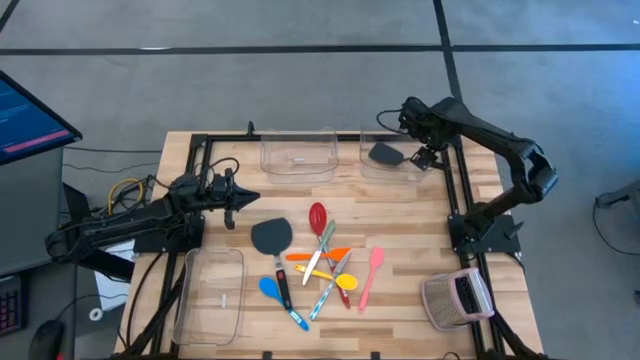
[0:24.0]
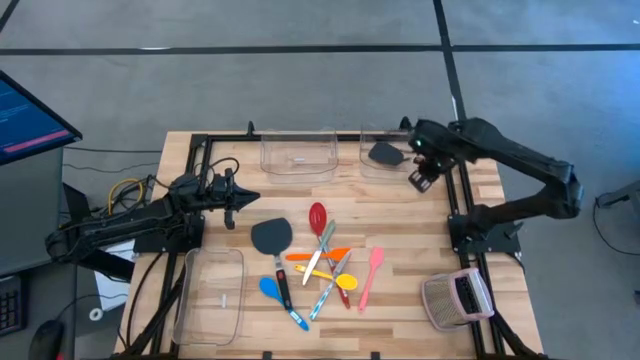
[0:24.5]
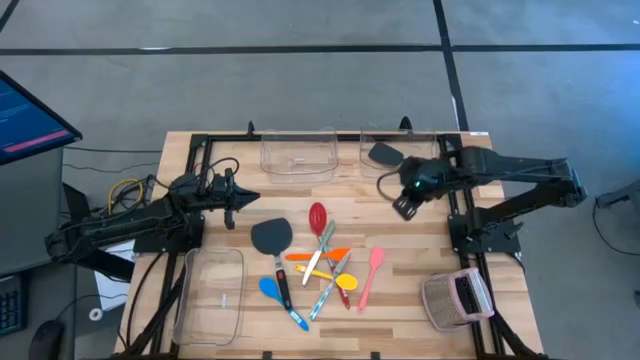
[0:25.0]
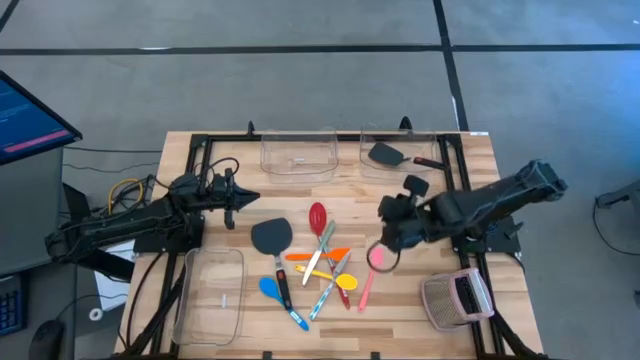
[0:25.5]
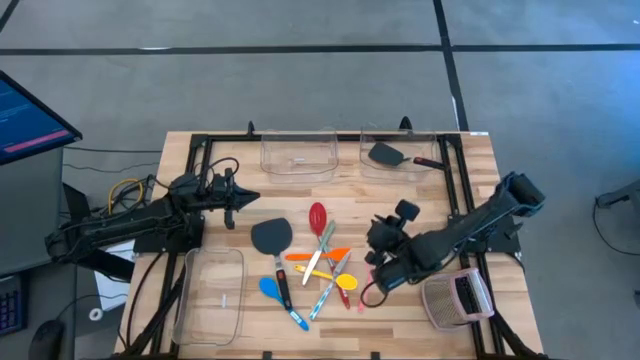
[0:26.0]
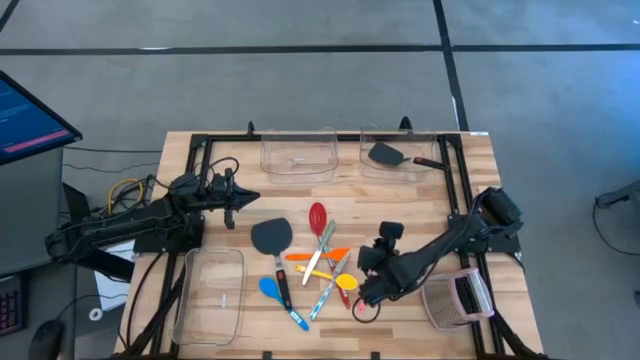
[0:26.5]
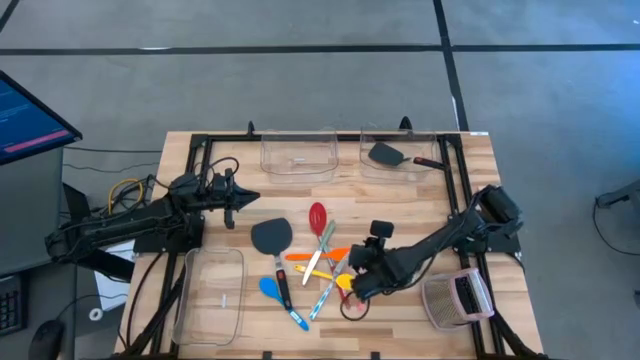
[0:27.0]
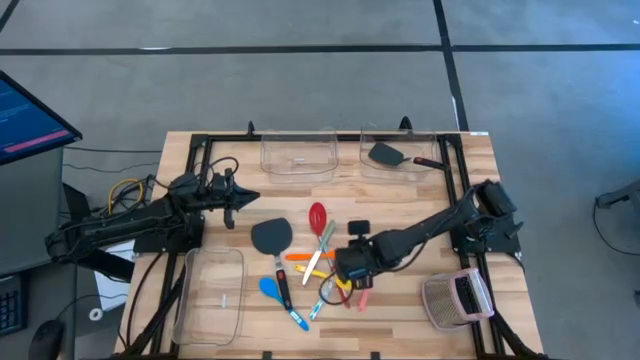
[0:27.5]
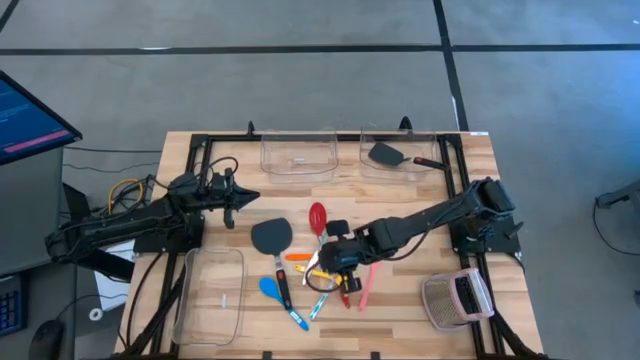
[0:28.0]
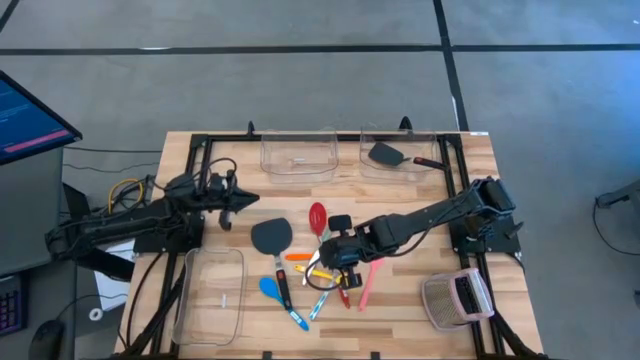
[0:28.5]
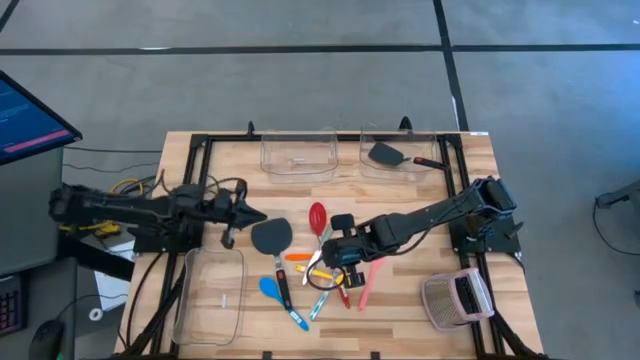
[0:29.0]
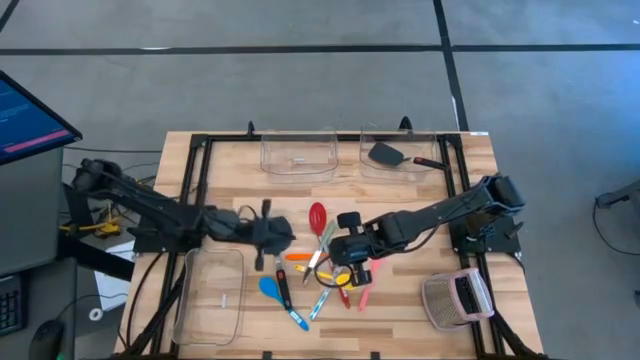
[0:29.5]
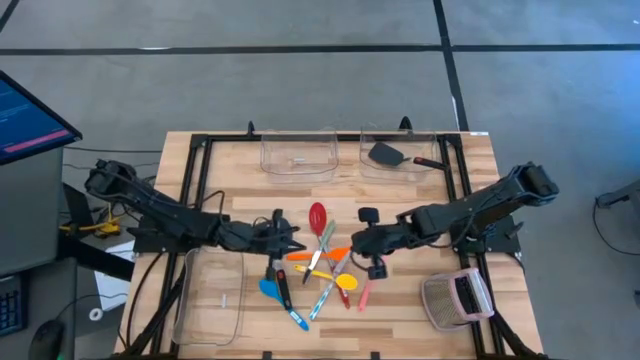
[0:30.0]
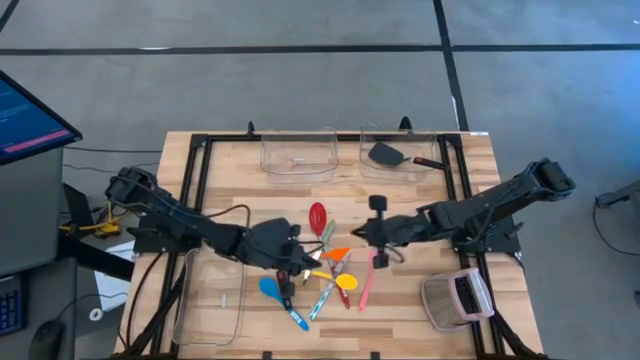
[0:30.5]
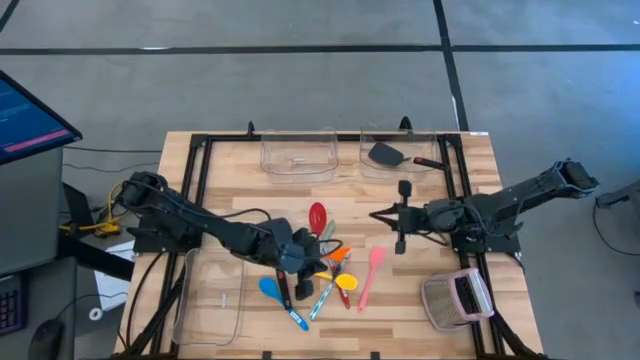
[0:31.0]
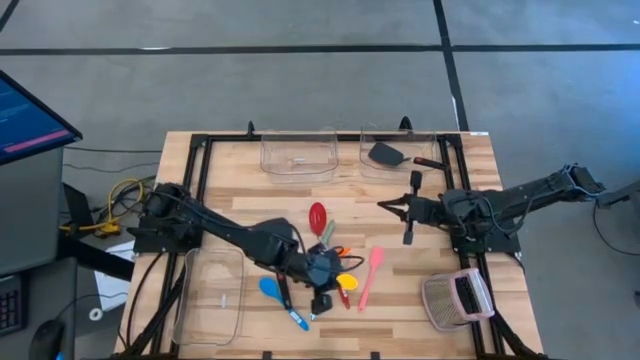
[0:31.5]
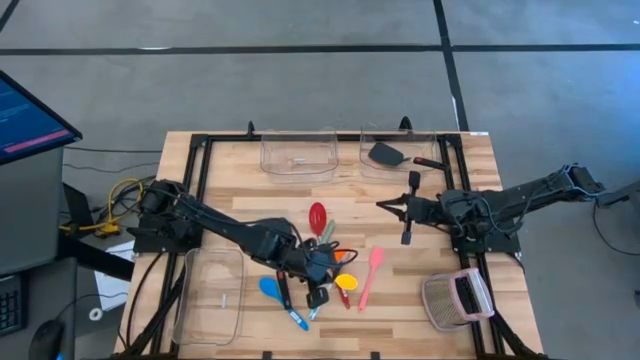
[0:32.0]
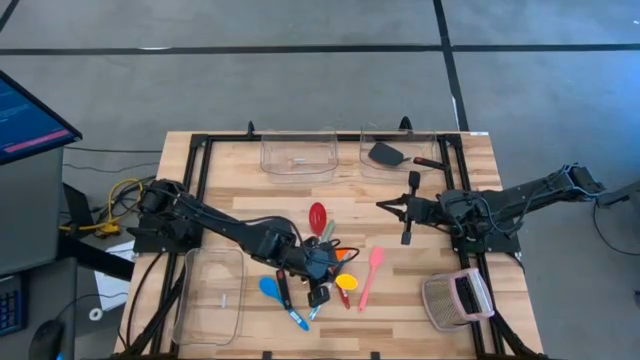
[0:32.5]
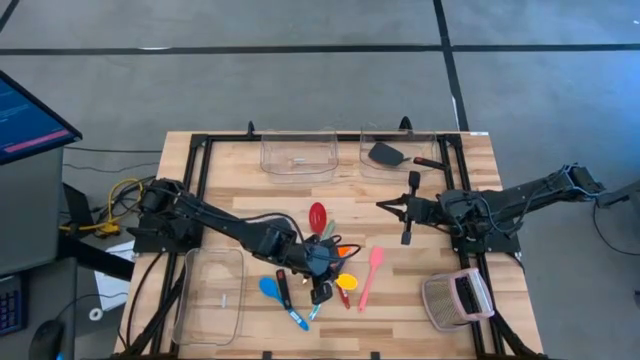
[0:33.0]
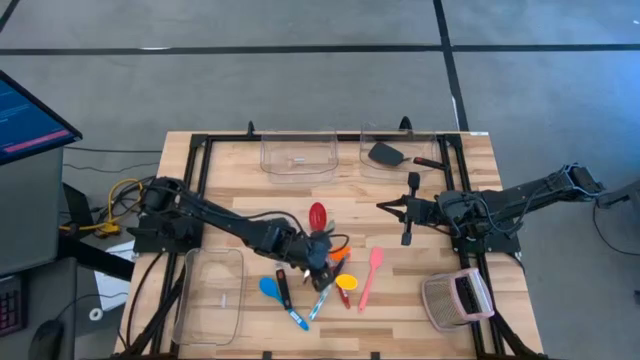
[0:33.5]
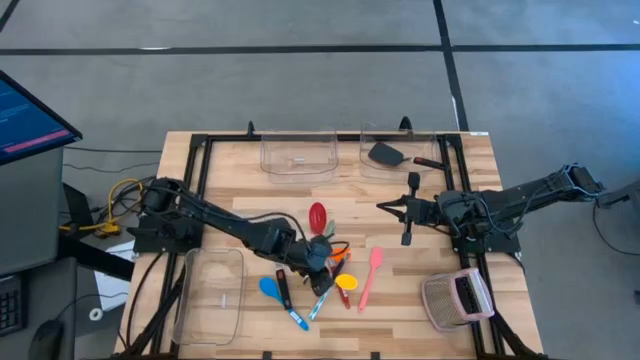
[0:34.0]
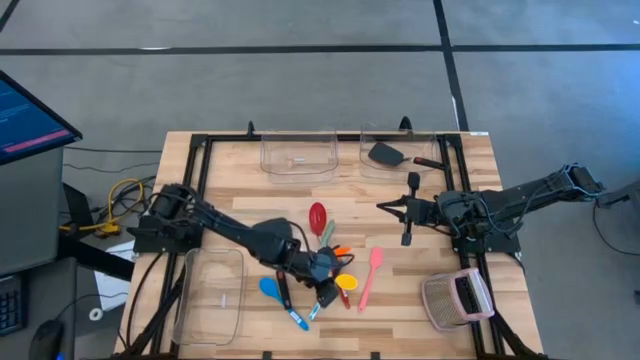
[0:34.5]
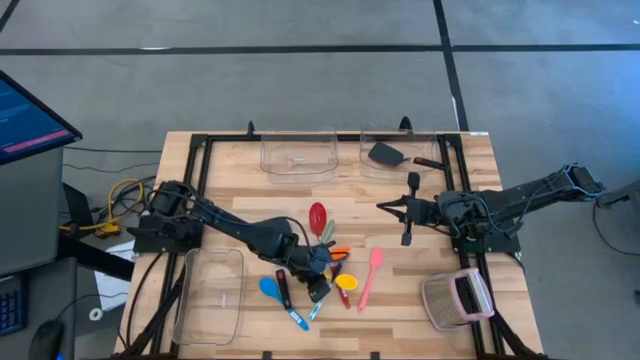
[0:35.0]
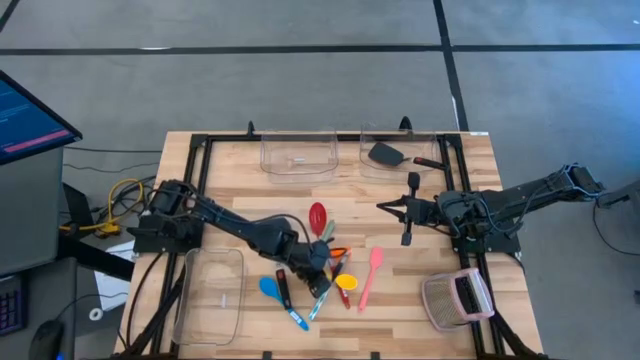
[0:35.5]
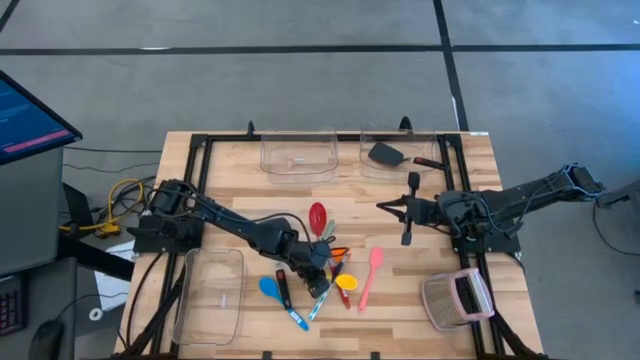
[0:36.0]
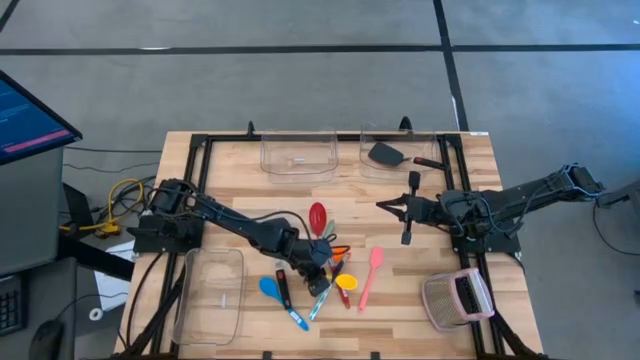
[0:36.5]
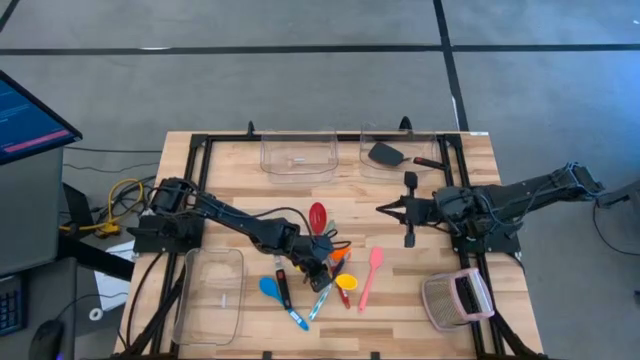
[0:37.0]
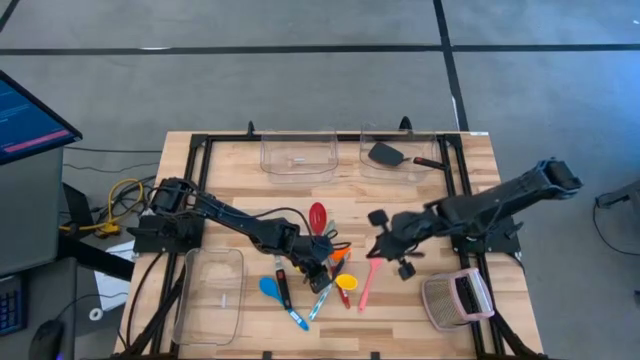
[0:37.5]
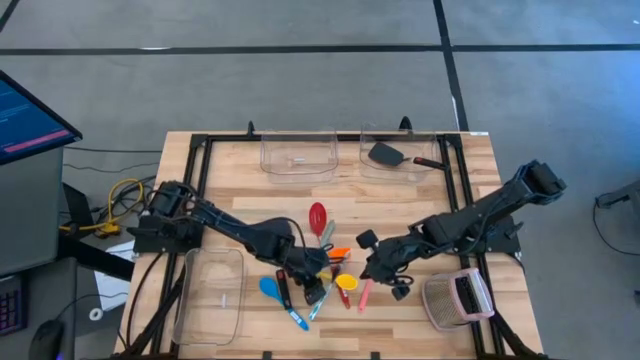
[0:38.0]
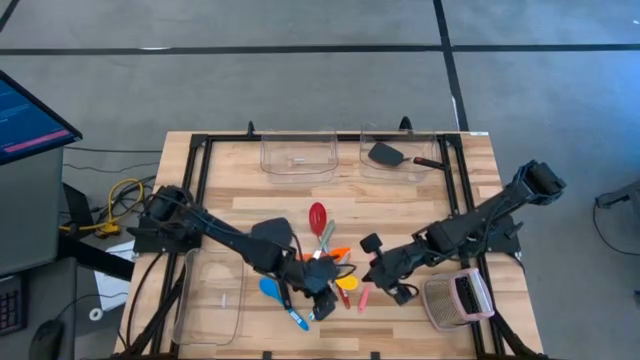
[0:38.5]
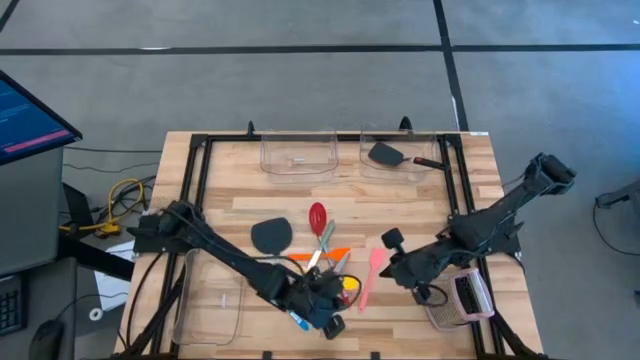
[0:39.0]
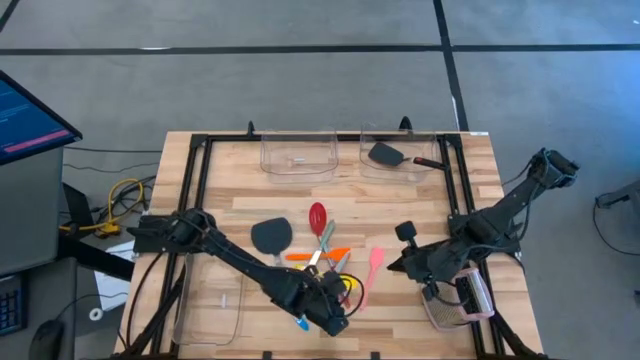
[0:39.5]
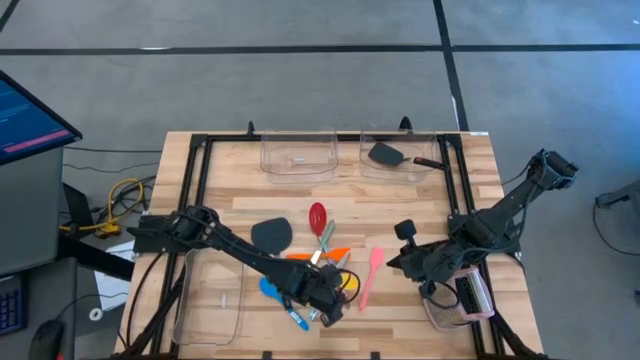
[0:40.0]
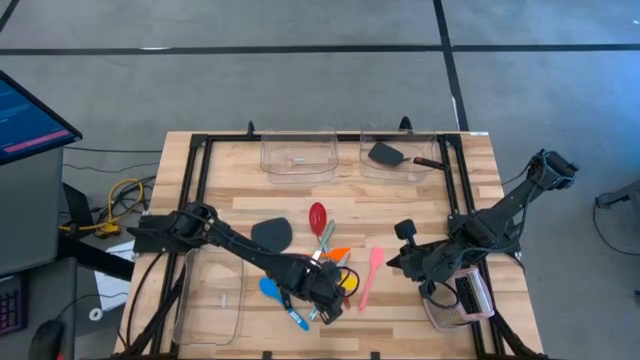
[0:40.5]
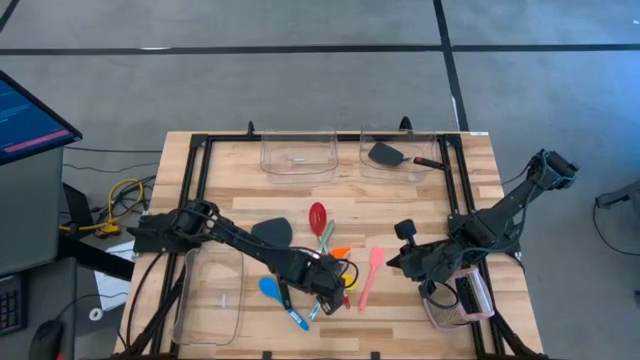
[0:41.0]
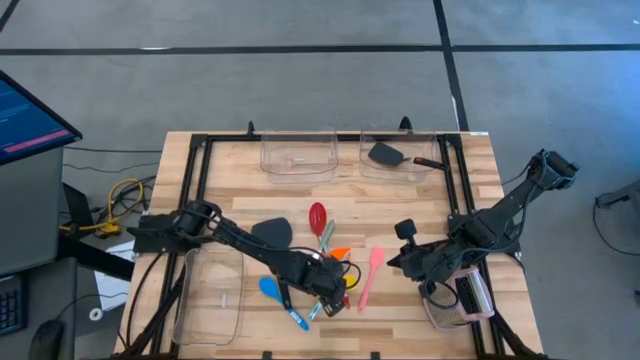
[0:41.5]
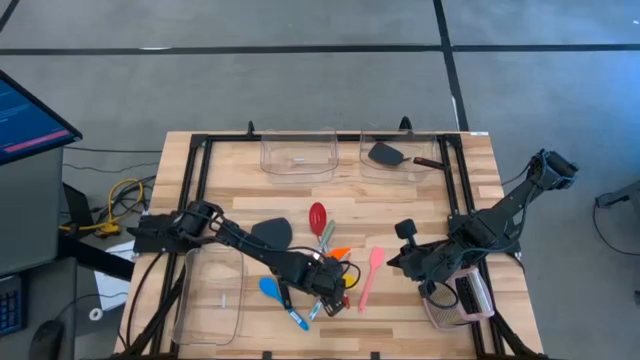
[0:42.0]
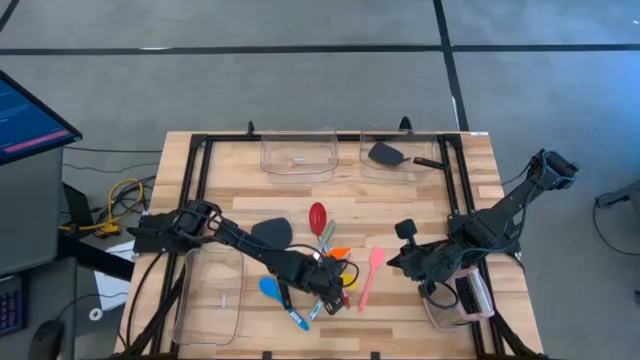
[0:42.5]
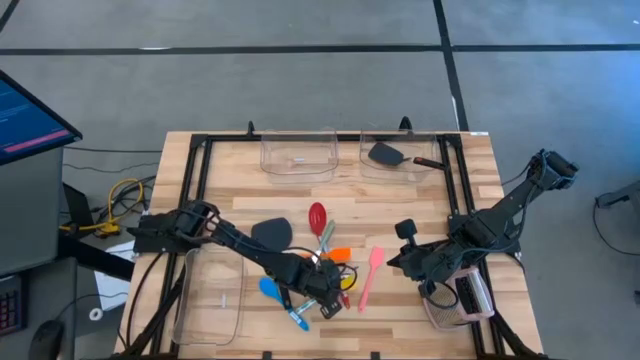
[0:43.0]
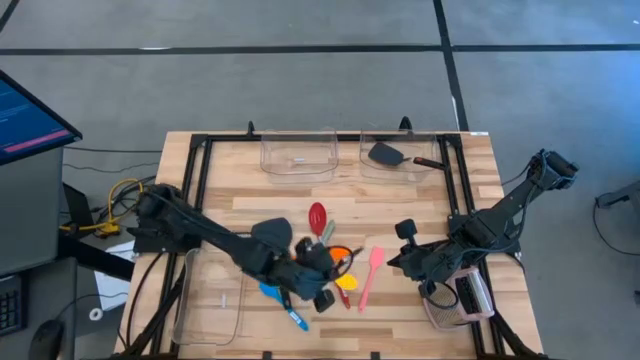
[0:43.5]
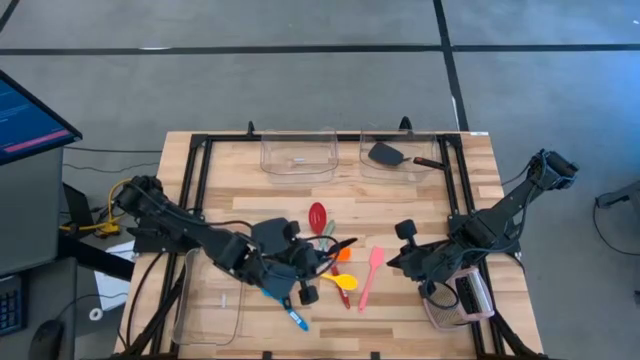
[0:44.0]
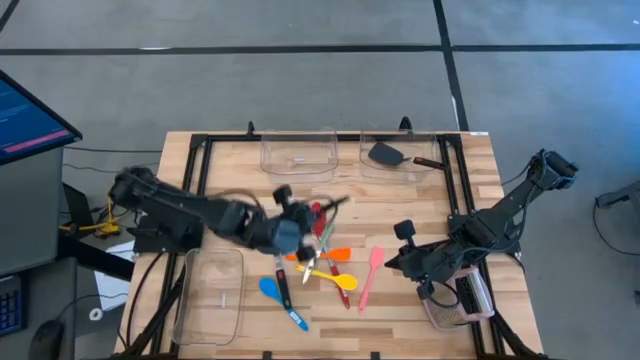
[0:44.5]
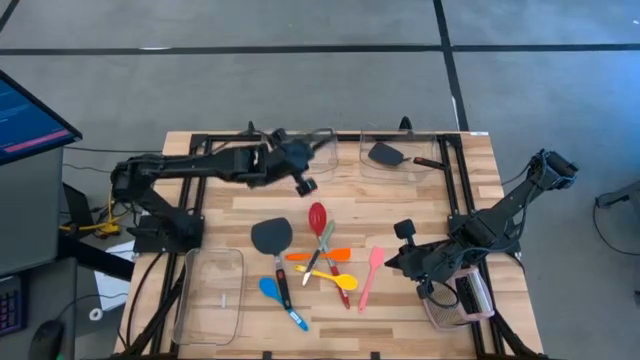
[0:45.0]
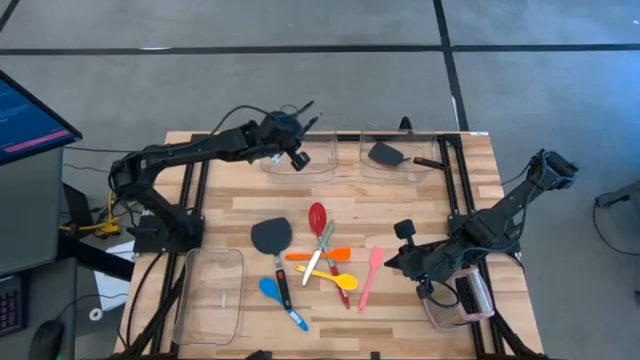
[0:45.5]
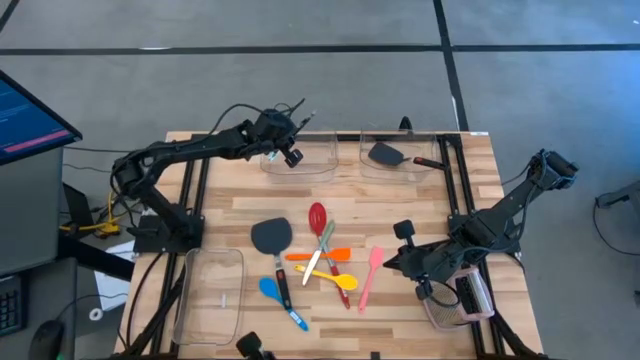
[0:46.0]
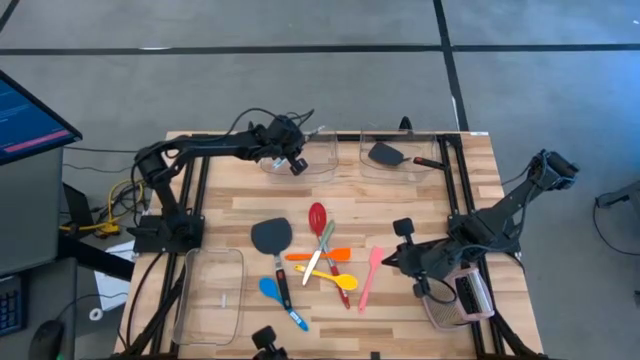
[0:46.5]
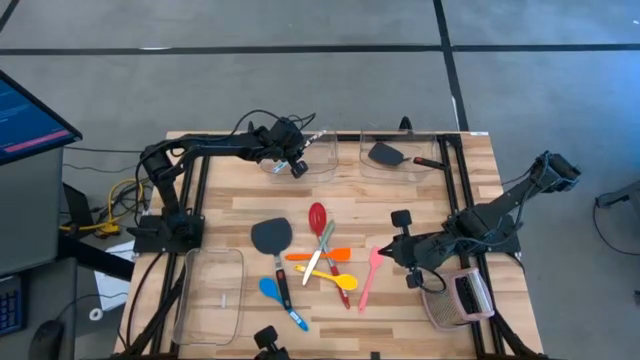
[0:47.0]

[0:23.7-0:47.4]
Task: Pick & Place Kitchen Items
Put the blue patterned table knife into the top left transparent bin
